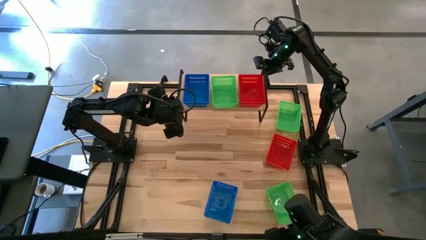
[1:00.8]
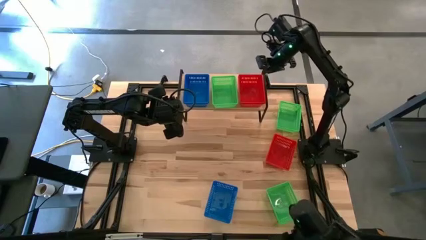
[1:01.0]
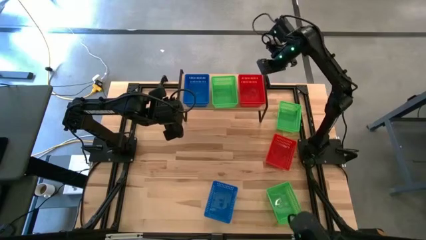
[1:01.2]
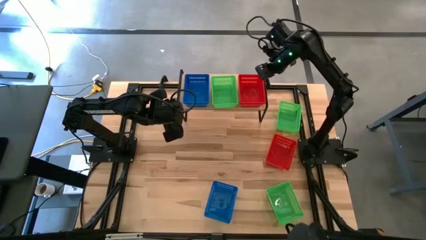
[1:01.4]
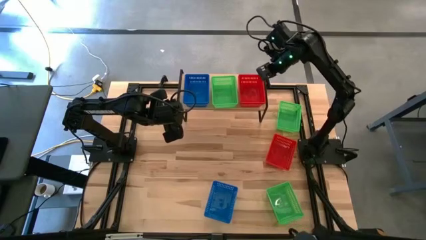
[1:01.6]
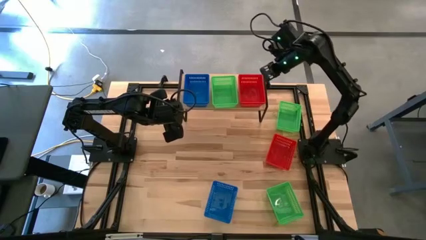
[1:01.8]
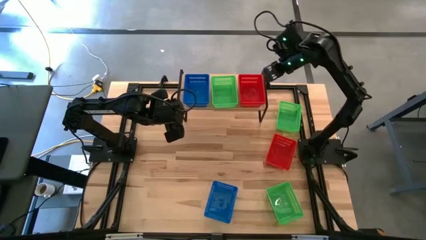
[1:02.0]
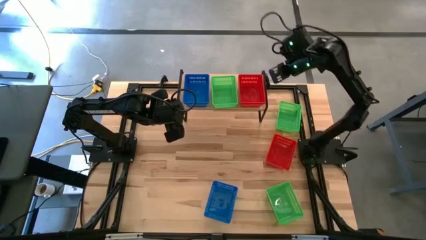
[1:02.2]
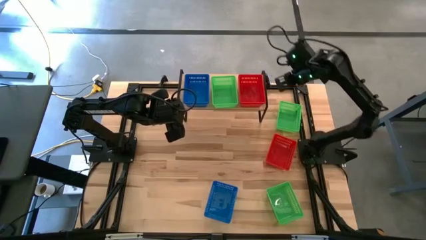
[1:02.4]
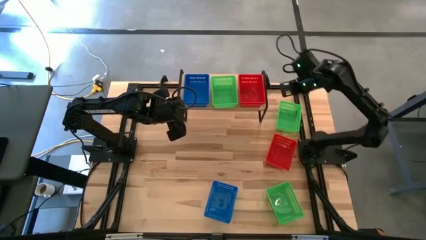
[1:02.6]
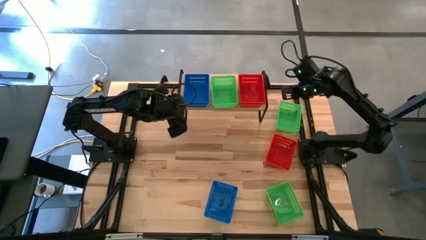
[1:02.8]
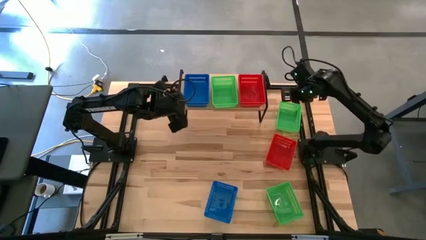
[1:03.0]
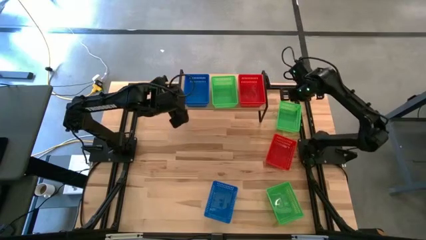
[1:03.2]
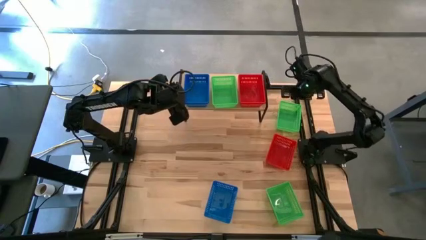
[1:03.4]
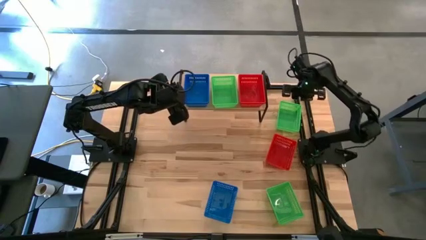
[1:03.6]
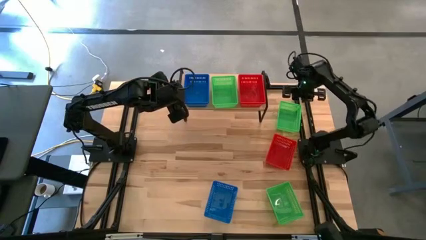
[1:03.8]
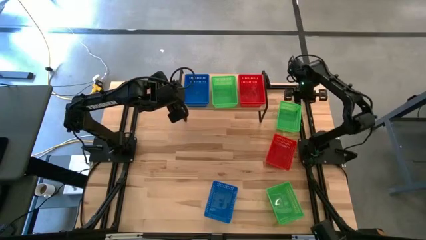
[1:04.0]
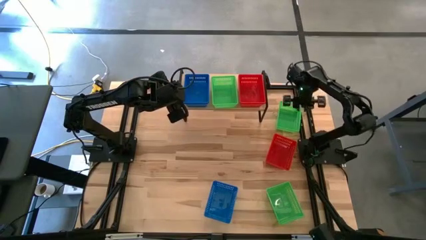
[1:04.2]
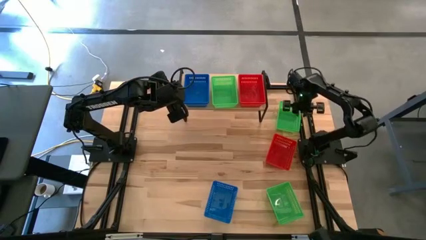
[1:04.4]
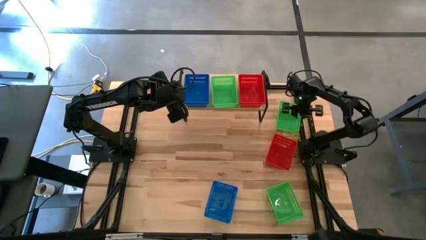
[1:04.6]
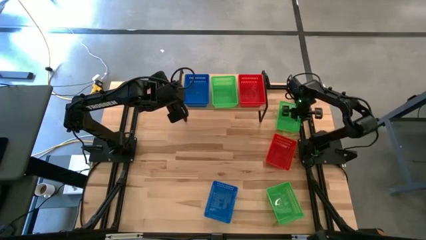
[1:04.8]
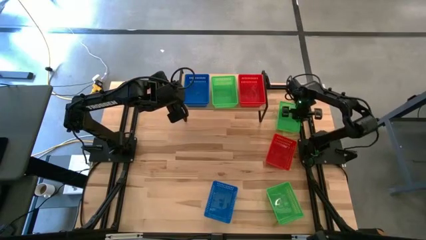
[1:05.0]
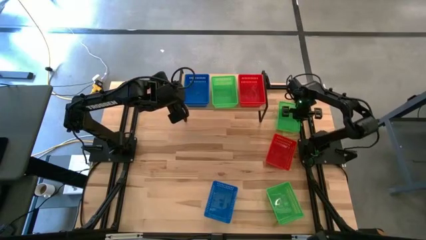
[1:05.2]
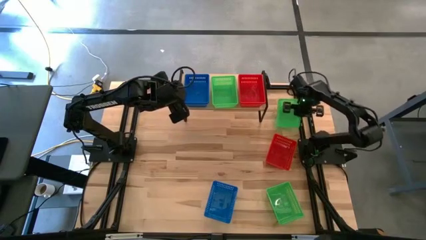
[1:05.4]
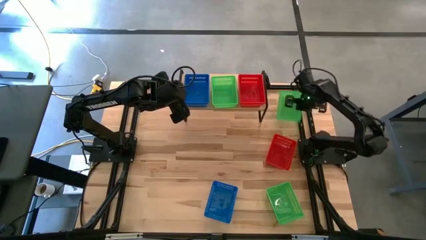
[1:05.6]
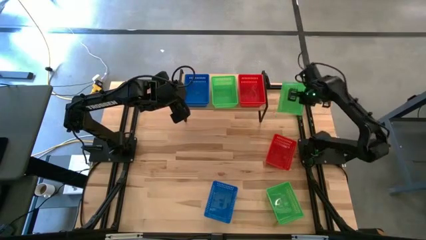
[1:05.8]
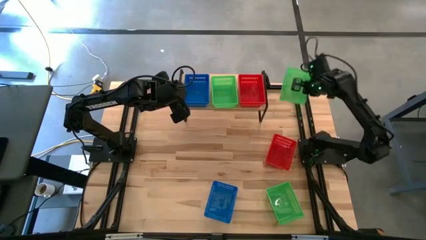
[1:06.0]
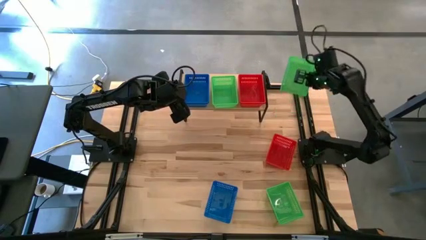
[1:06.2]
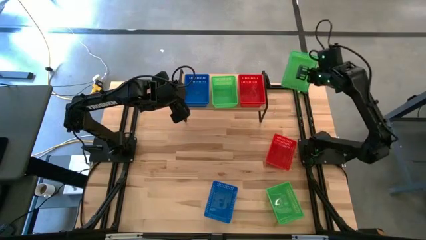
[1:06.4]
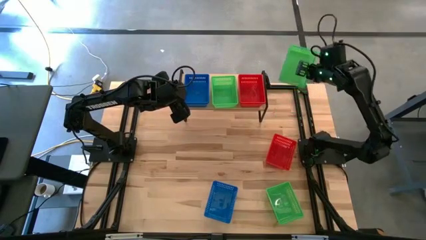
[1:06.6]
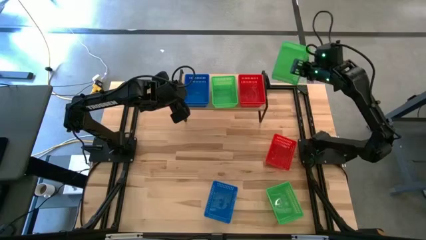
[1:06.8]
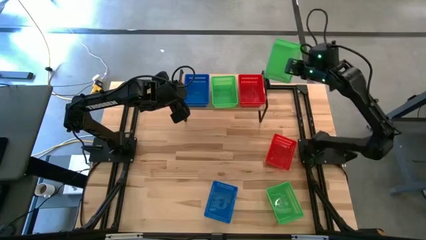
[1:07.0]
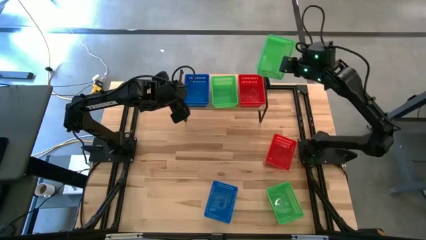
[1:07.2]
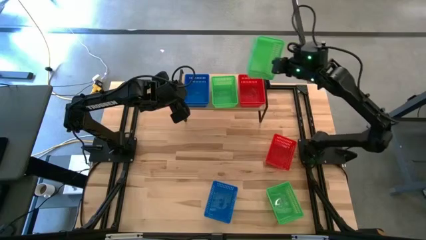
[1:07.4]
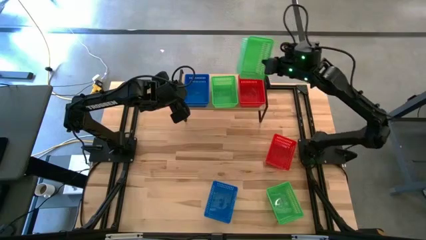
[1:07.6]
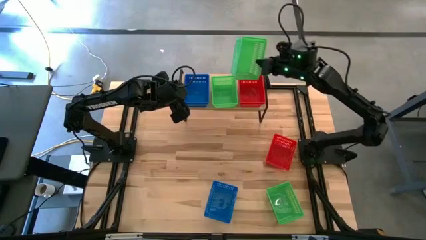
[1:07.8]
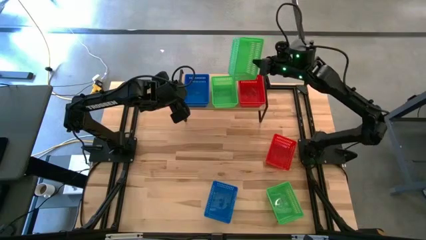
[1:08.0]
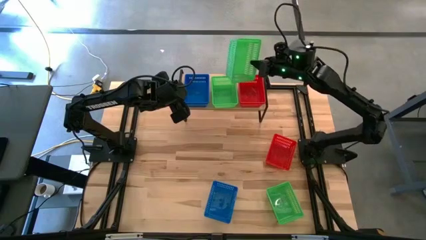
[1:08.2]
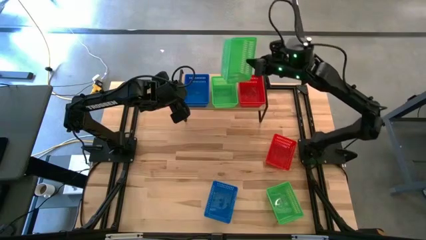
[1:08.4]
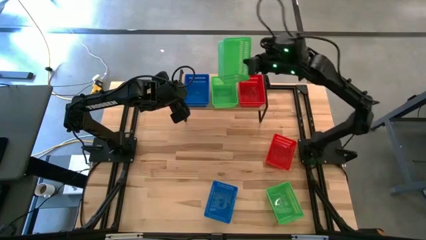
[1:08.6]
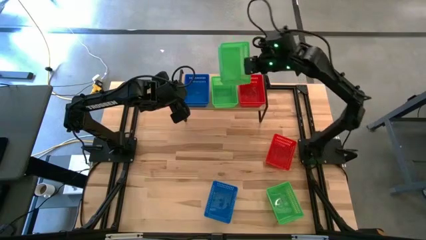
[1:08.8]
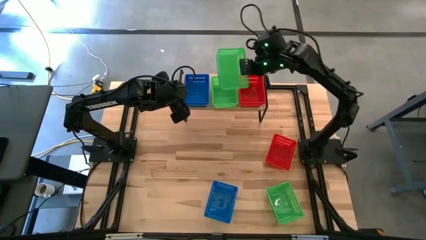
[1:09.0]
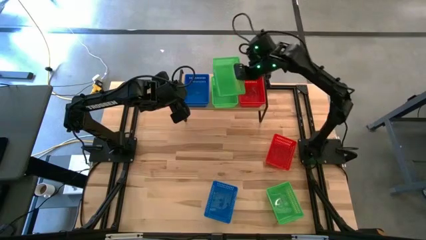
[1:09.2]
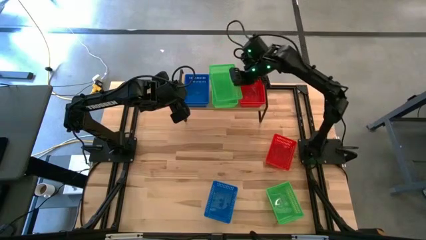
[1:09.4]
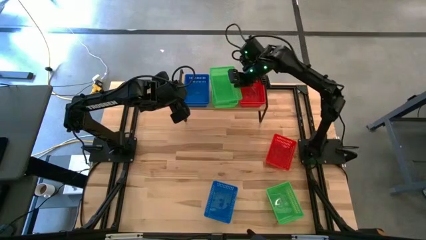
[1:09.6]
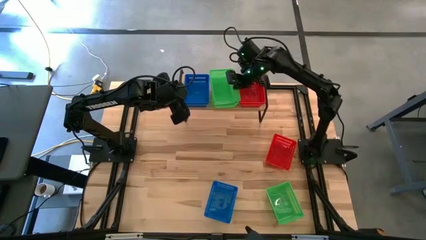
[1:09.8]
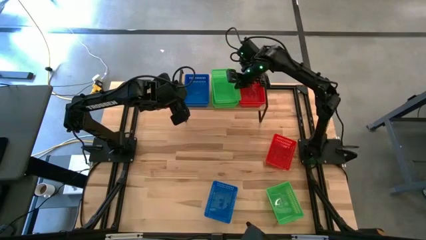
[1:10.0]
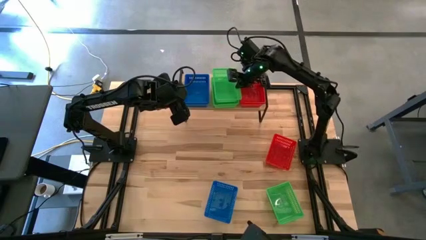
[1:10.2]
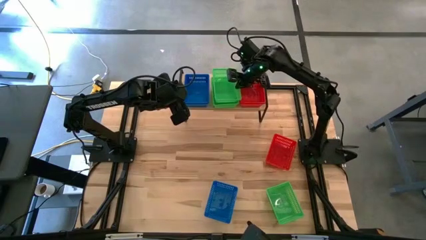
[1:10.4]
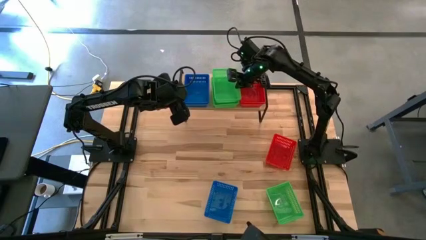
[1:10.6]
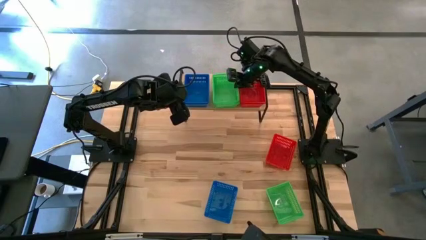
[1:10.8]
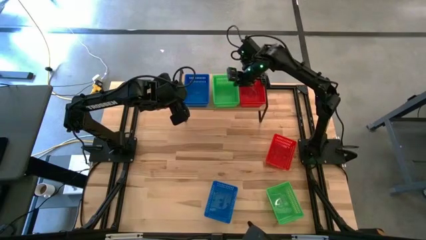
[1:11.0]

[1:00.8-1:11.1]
Task: Stack baskets on shelf by color
Stack the top green bin on top of the other green bin on the shelf

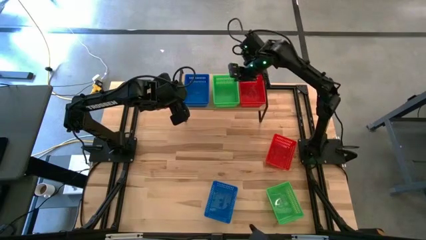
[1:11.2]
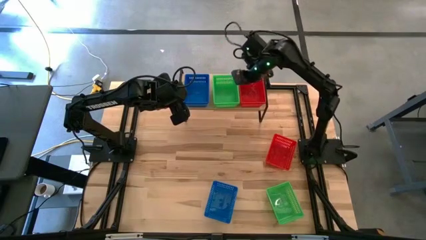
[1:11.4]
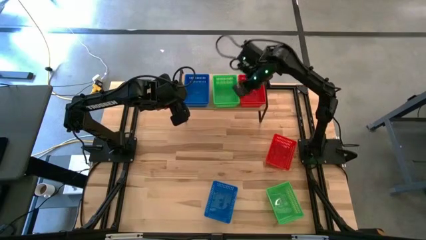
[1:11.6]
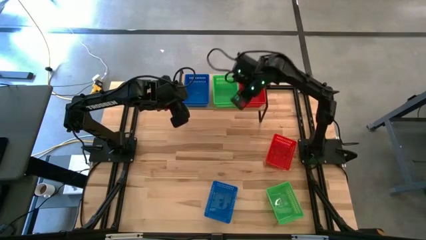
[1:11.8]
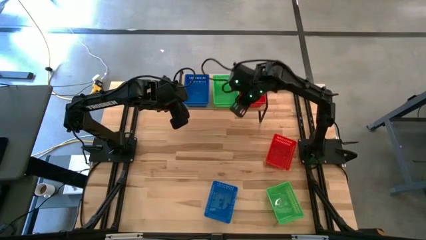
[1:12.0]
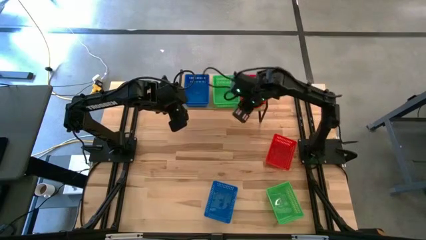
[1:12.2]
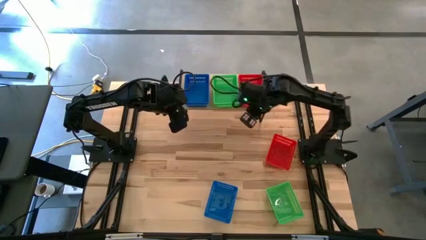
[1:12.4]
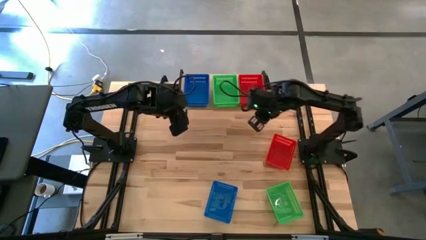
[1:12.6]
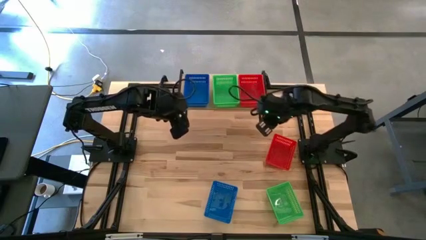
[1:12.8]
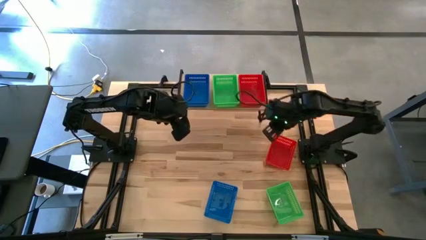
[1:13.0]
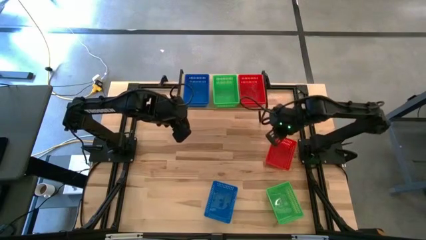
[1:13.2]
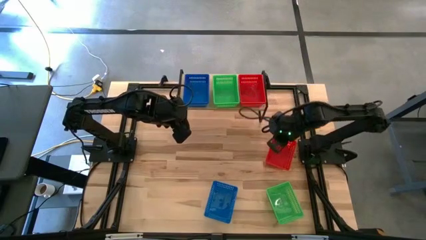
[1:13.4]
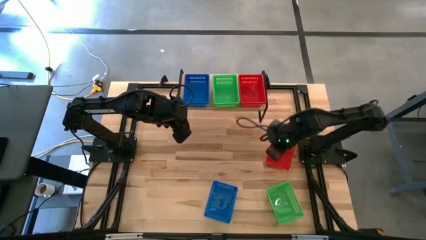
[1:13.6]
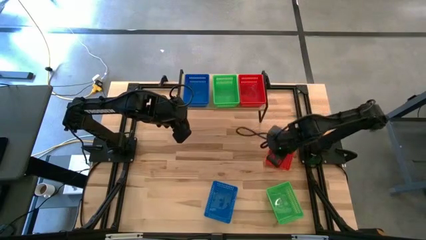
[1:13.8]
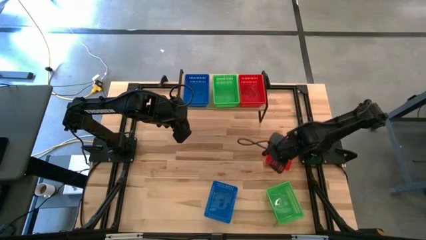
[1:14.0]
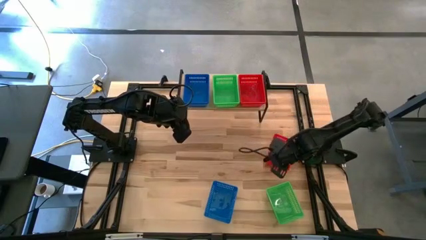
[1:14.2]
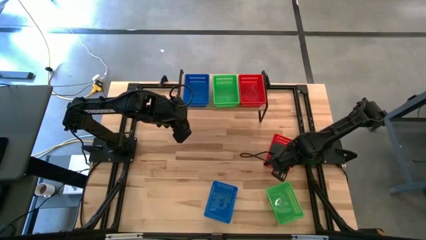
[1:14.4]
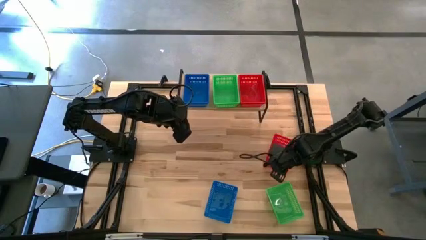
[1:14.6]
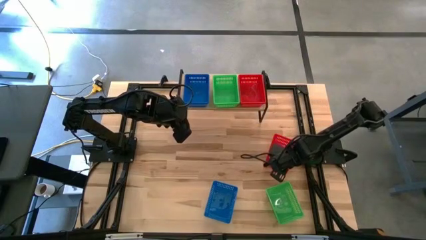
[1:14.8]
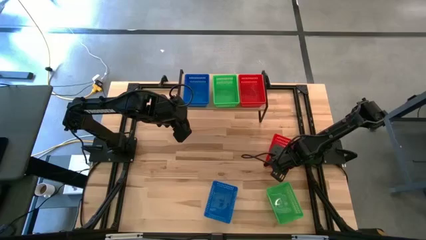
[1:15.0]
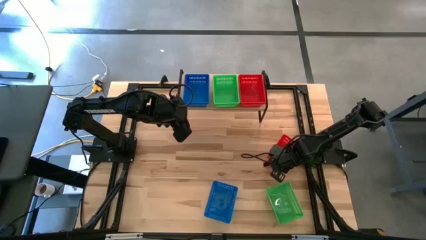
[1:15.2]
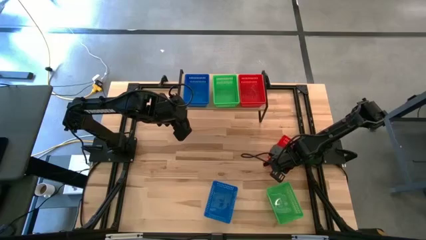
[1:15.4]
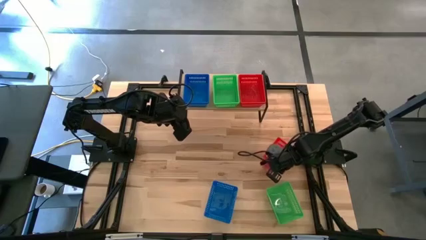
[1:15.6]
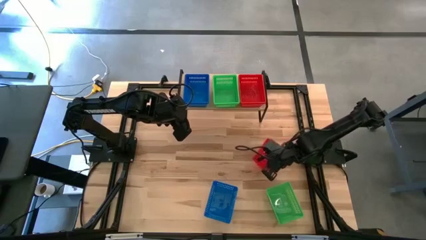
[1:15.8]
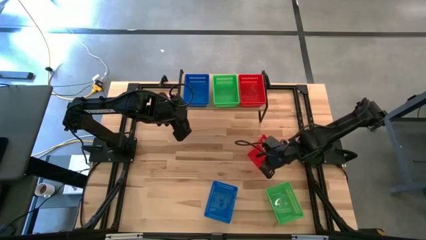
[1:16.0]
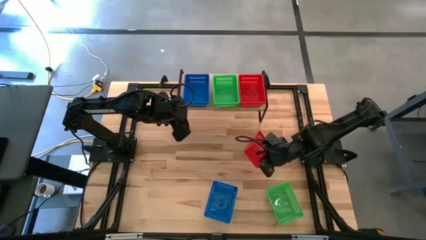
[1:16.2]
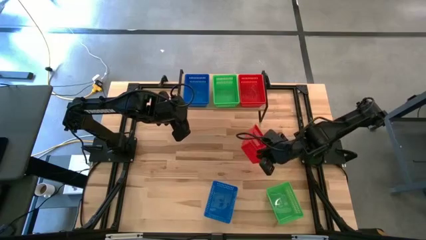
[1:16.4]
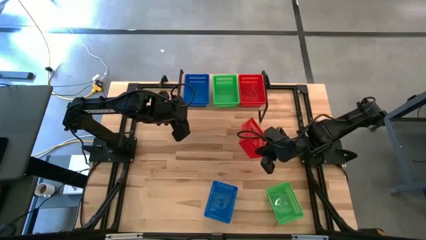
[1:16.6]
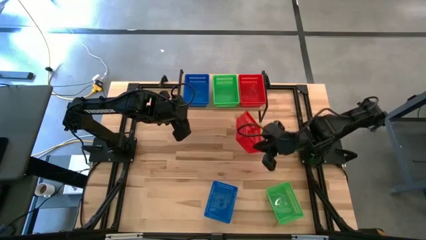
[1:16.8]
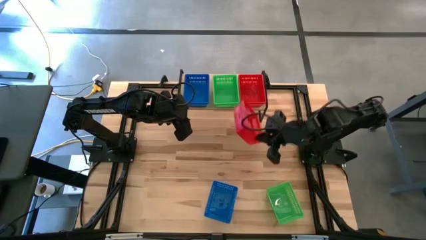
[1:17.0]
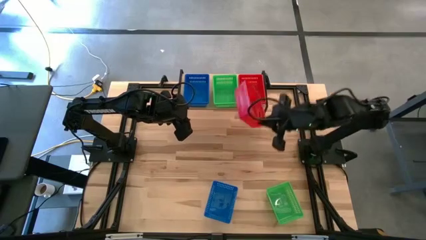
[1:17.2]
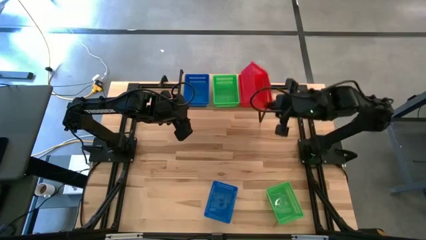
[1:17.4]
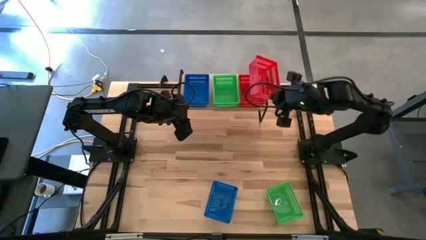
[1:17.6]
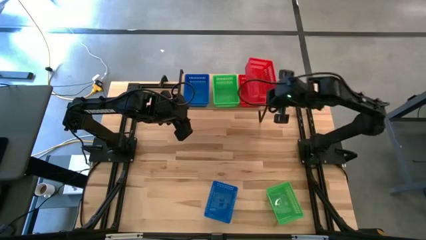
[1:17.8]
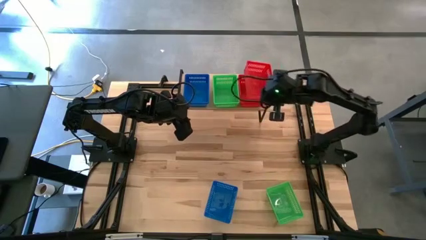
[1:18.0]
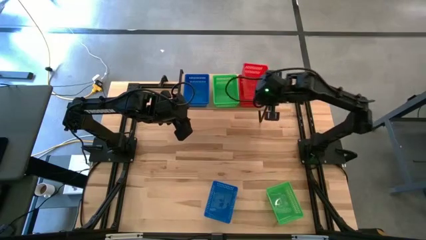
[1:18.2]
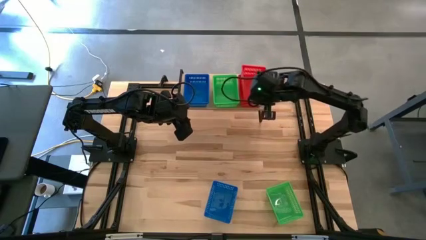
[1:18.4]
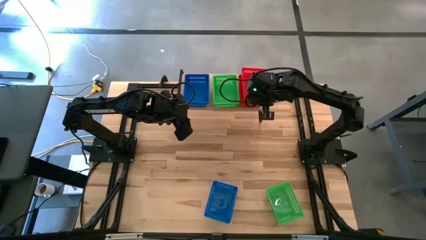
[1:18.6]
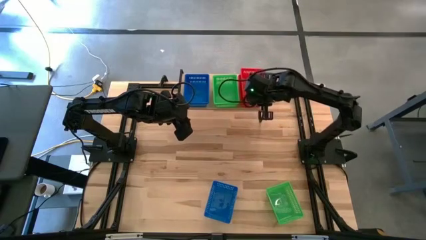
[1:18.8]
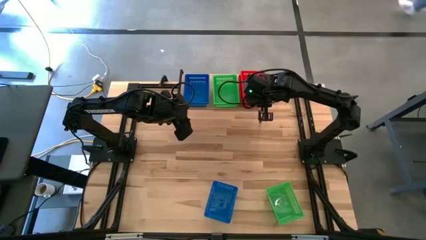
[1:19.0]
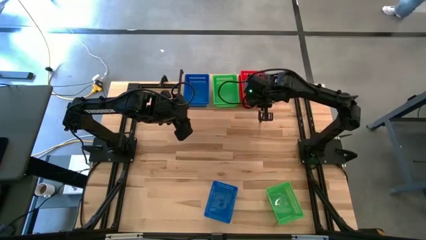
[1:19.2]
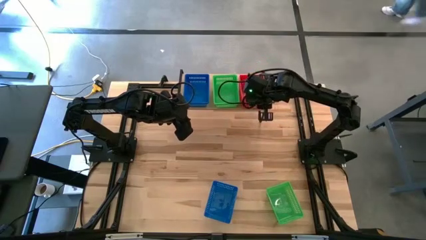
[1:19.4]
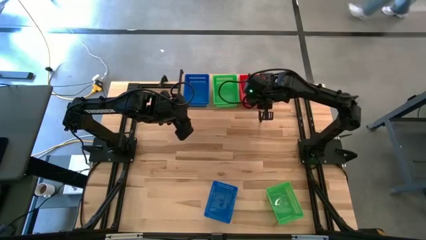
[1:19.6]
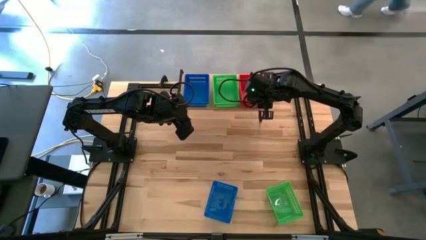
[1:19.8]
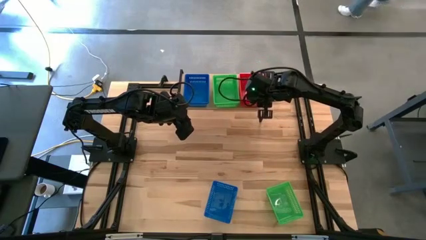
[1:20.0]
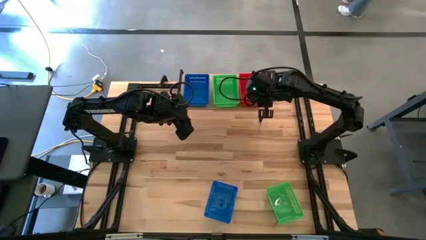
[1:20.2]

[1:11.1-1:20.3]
Stack the red bin on top of the other red bins on the shelf
